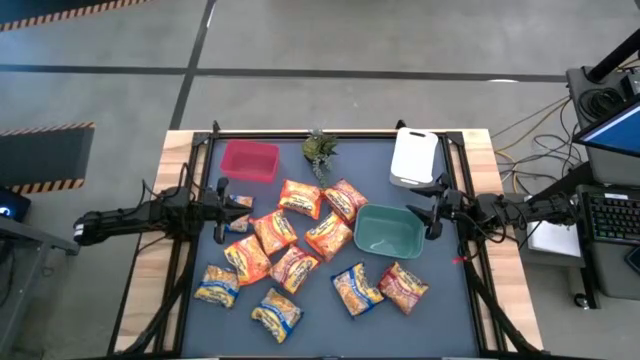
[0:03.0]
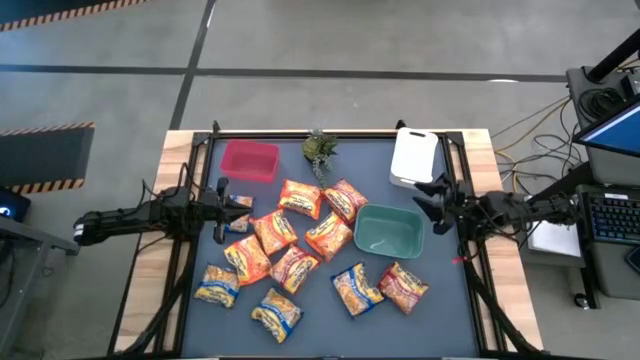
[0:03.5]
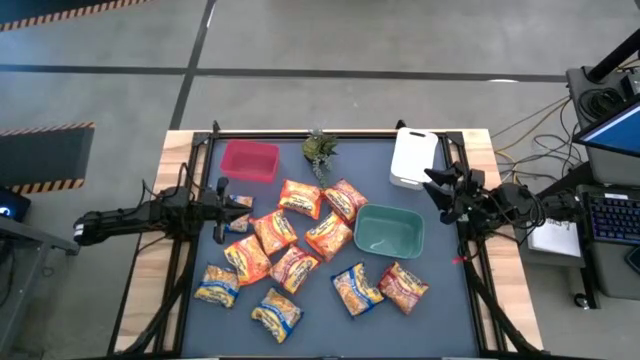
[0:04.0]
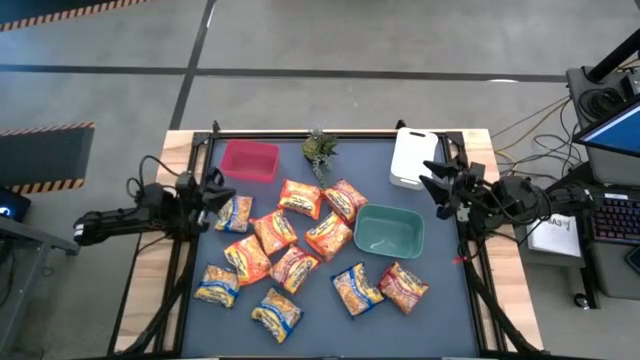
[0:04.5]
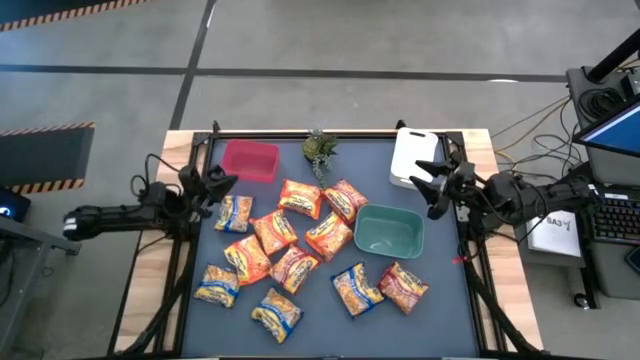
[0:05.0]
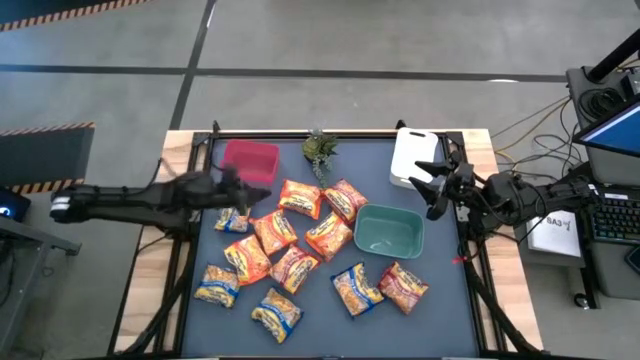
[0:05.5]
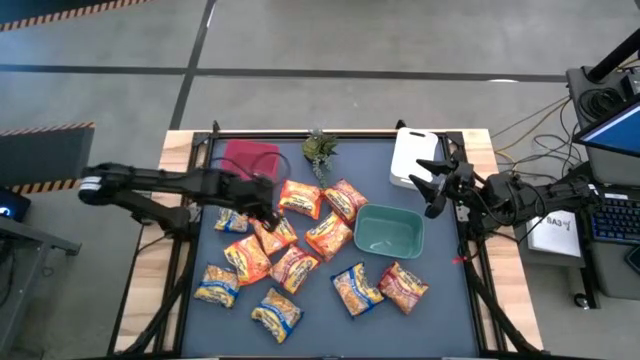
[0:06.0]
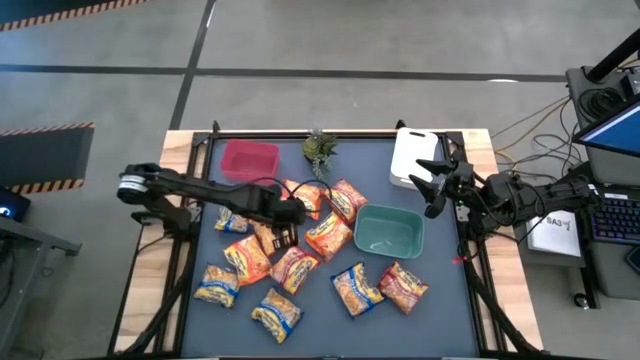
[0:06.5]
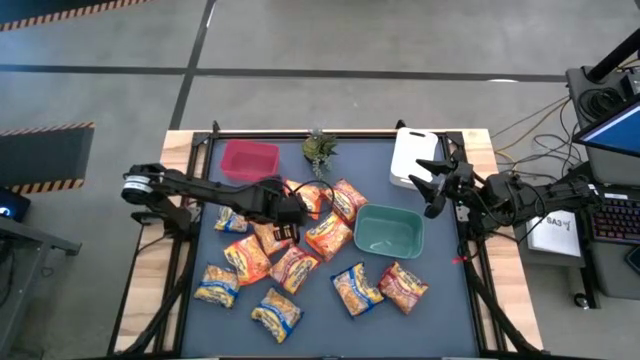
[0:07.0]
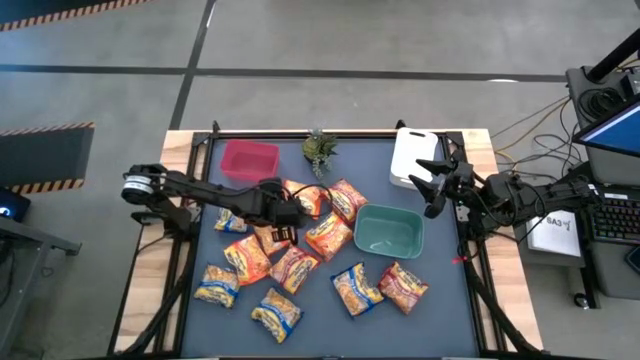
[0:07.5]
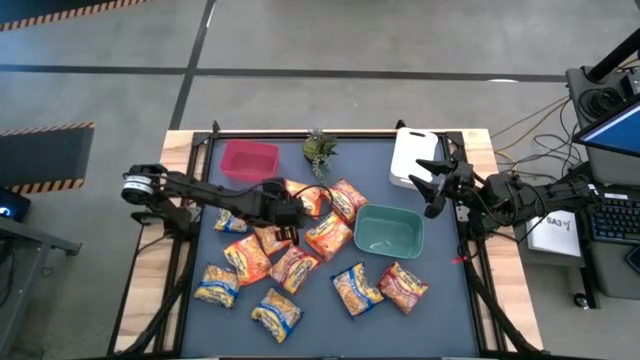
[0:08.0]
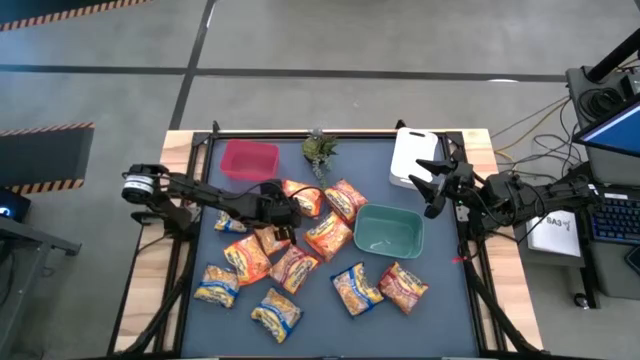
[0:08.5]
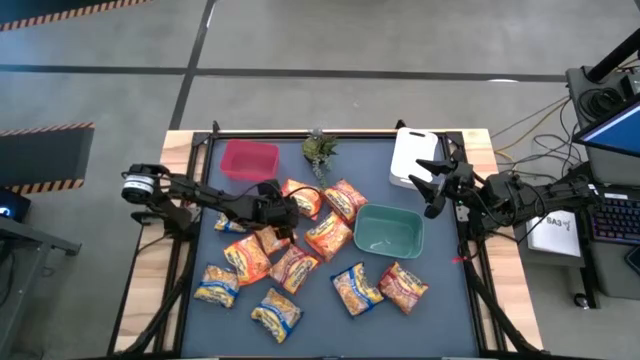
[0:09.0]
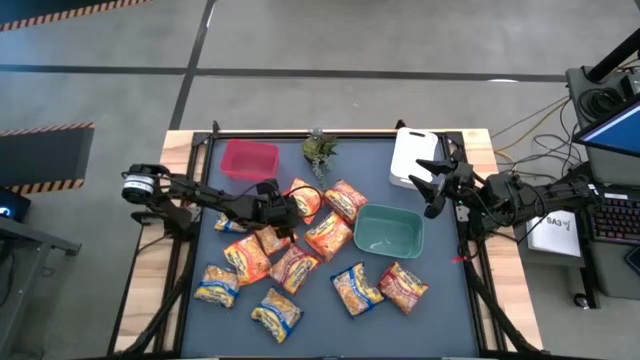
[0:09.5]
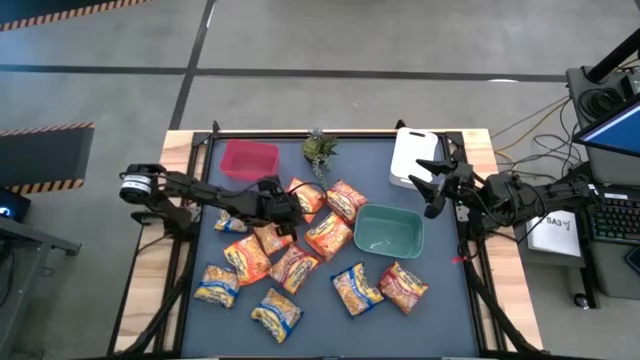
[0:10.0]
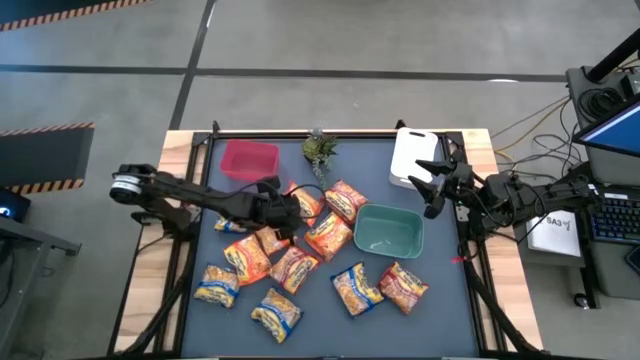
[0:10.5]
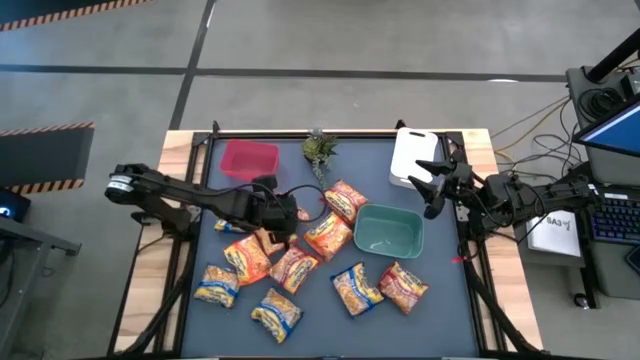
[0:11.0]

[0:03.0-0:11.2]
Task: Sort Maruchan noodles
Put the orange noodle pack into the red bin

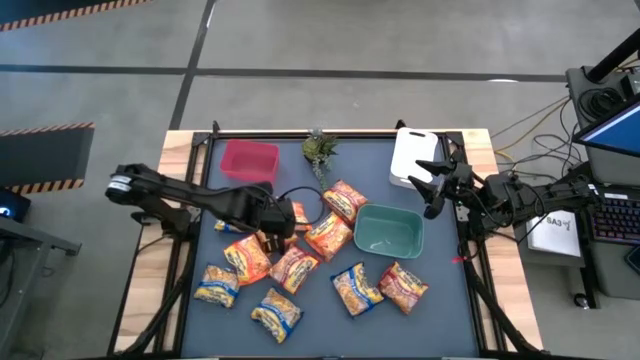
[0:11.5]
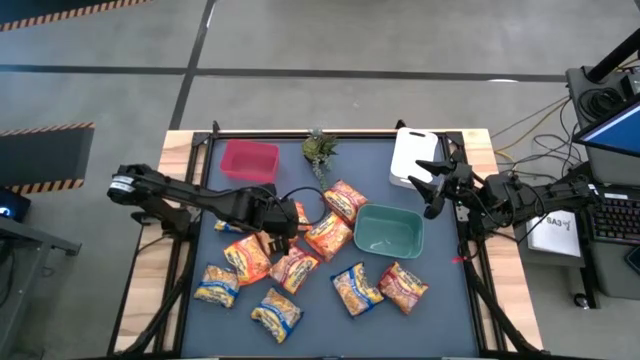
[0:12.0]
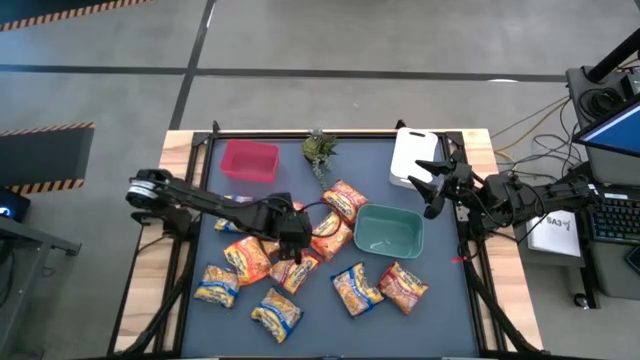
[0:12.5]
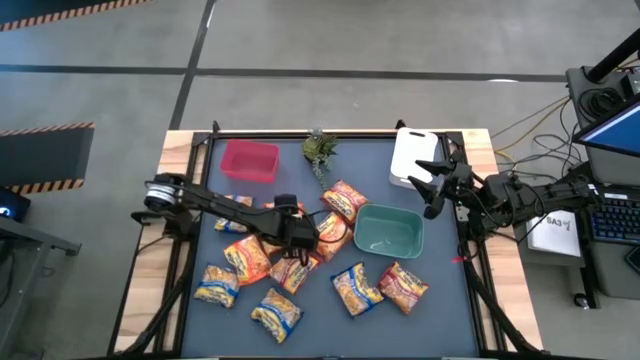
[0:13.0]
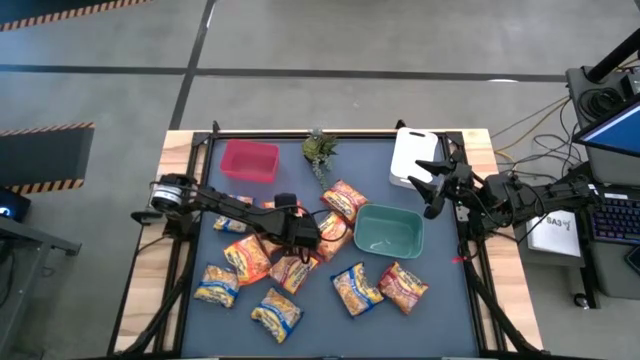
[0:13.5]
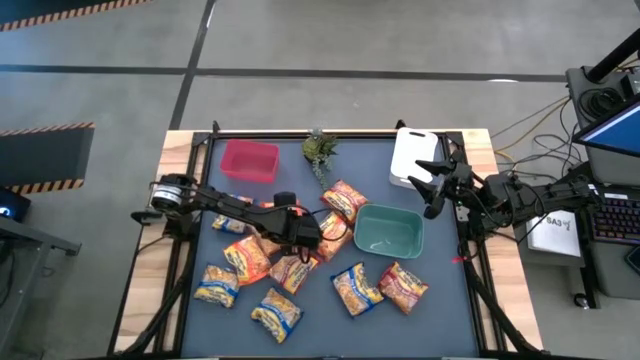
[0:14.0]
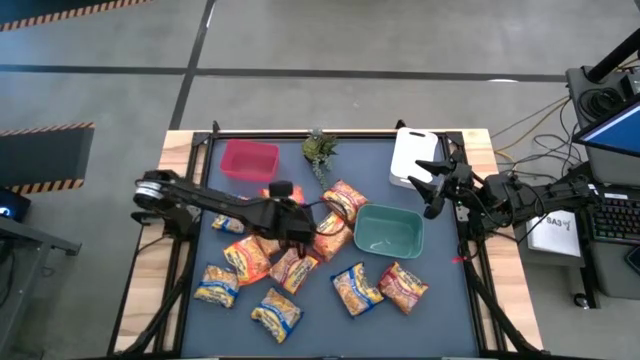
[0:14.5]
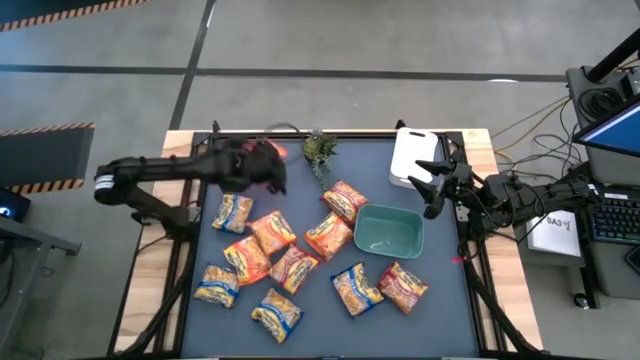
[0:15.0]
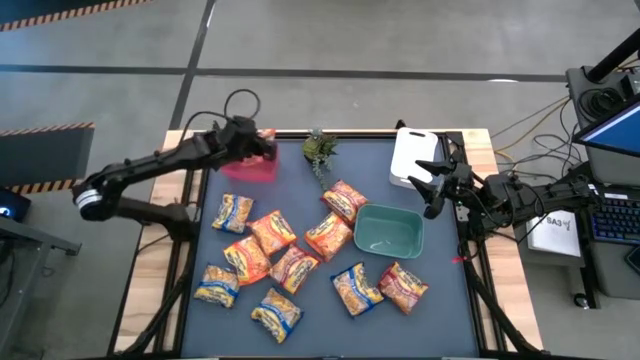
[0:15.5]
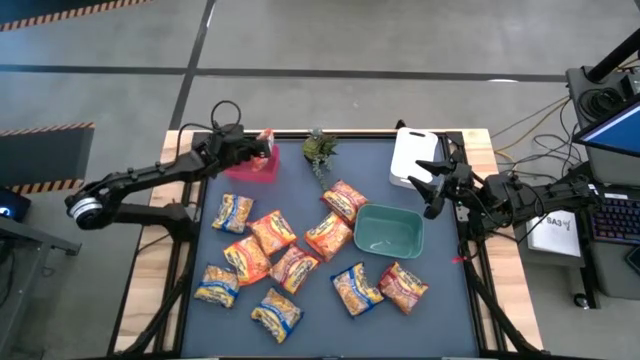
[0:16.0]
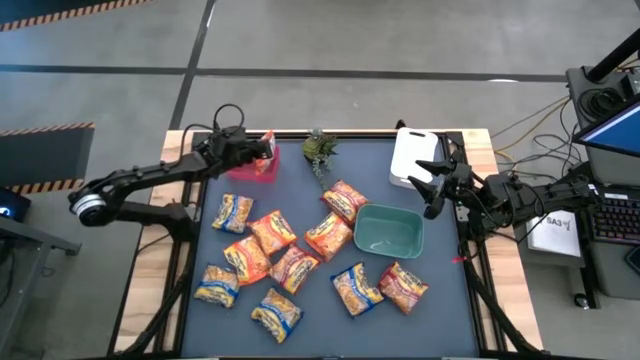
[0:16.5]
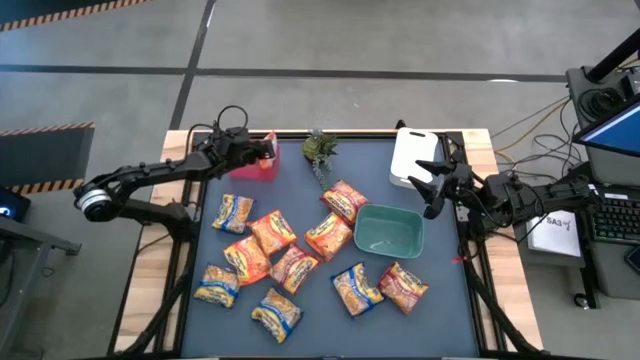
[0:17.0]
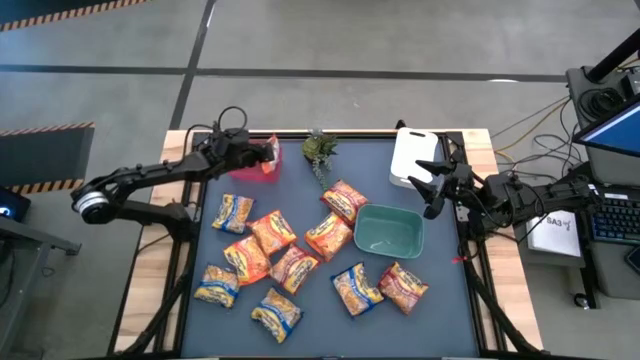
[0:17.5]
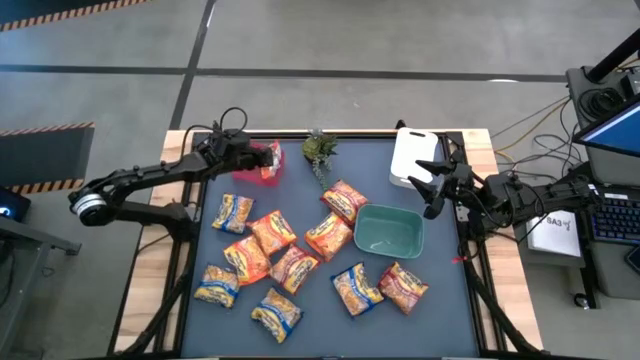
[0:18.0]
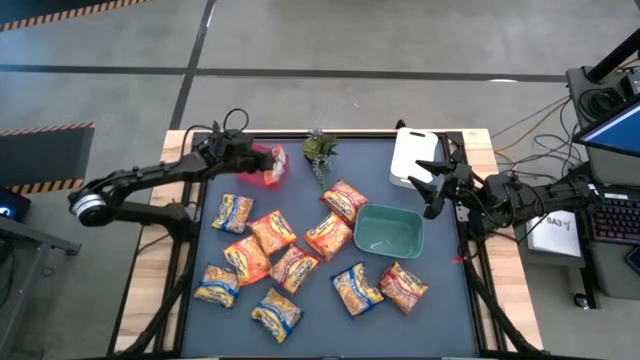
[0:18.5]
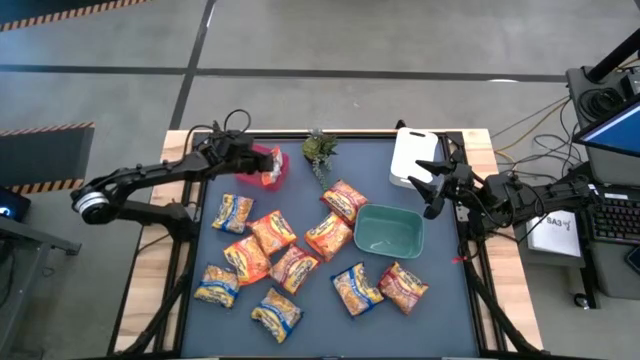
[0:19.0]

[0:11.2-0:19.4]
Put the orange noodle pack into the red bin

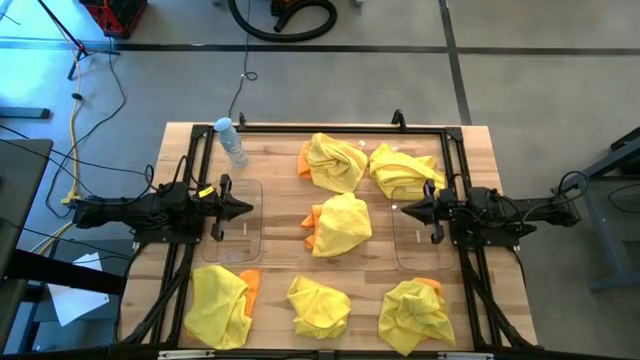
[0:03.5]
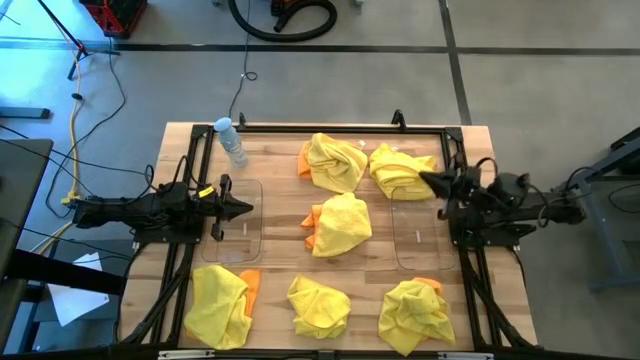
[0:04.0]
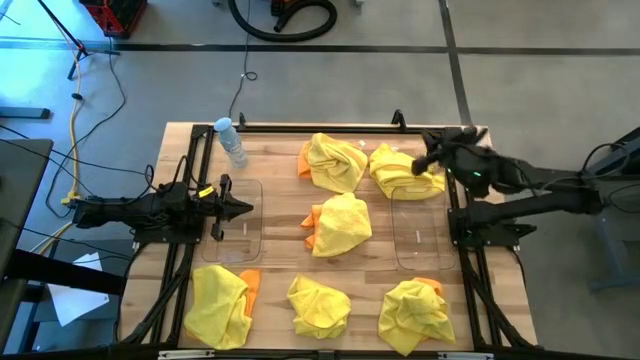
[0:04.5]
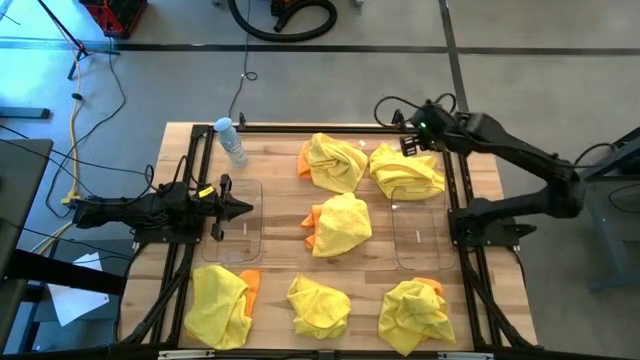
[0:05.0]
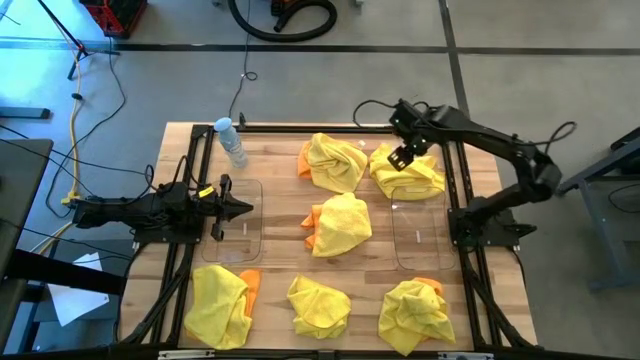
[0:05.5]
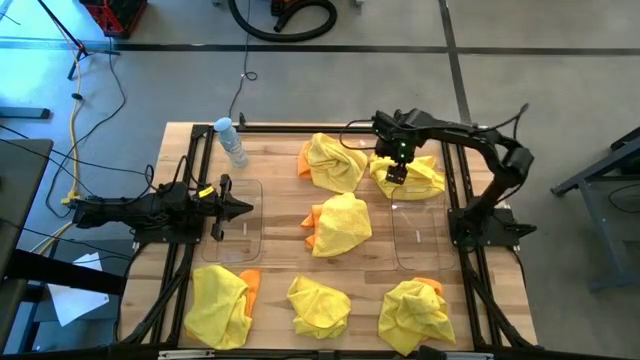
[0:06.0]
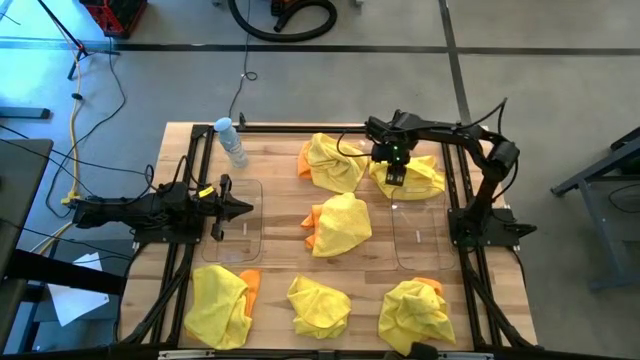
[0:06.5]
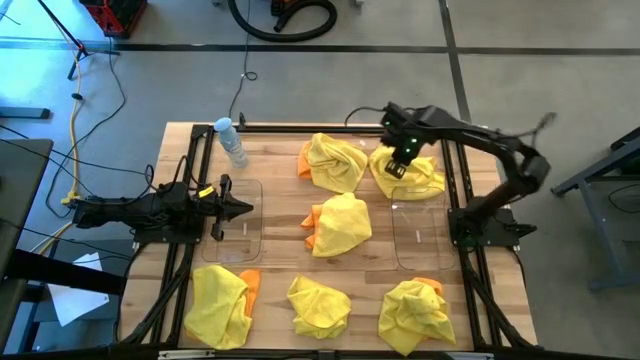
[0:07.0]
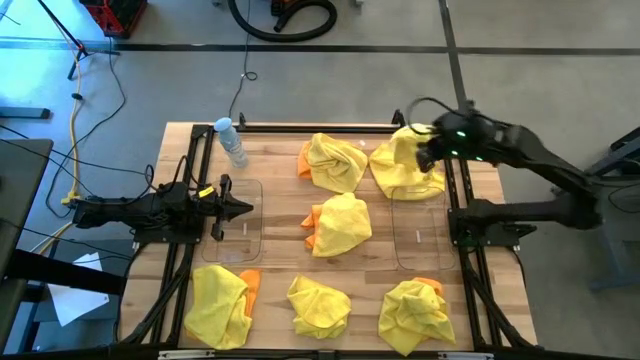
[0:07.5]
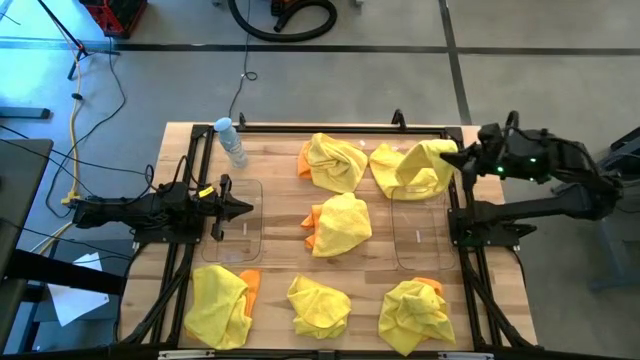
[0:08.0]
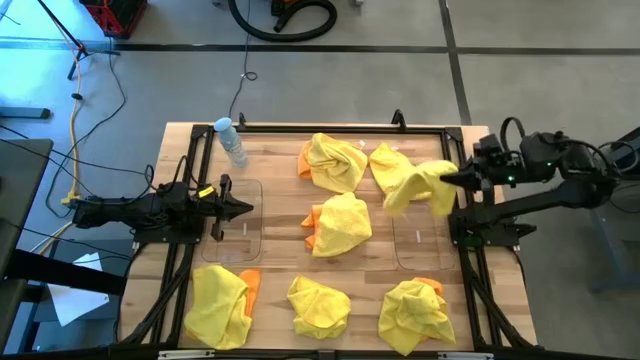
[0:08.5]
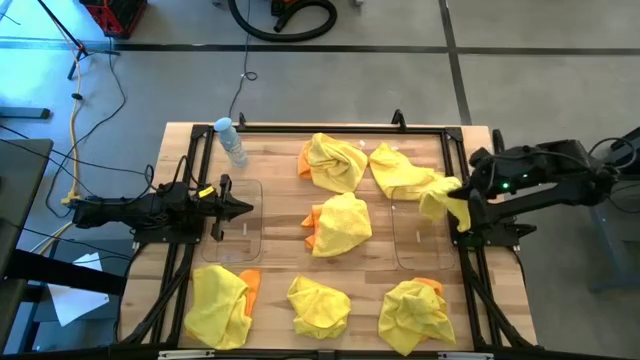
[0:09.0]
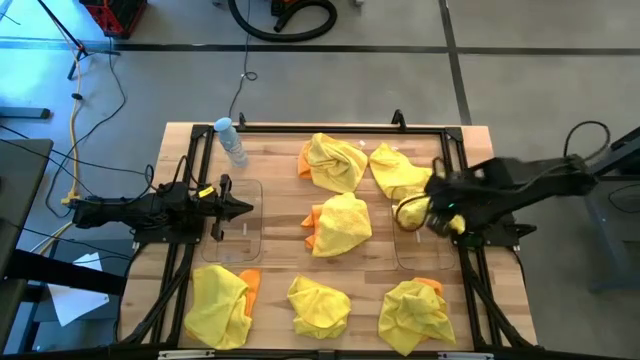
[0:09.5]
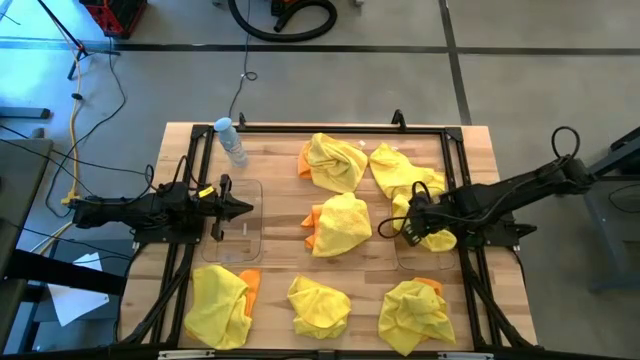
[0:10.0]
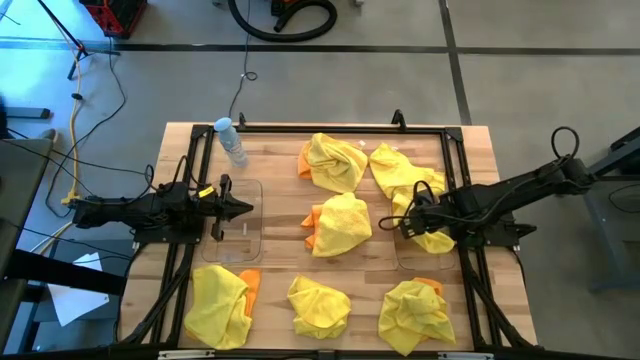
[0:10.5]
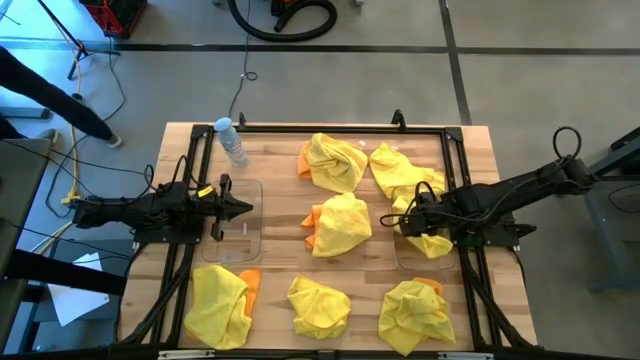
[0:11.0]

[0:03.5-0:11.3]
Task: Sort microfiber towel by color & place in baskets
Put the yellow towel into the right transparent bin
